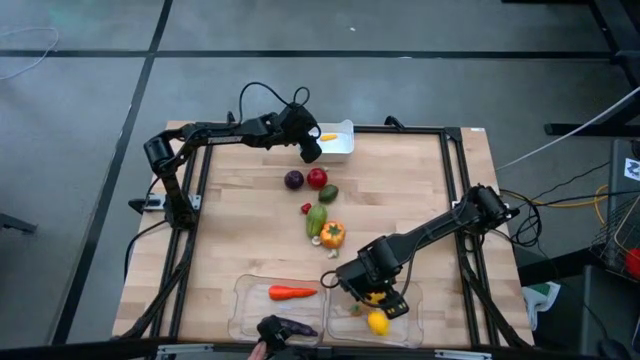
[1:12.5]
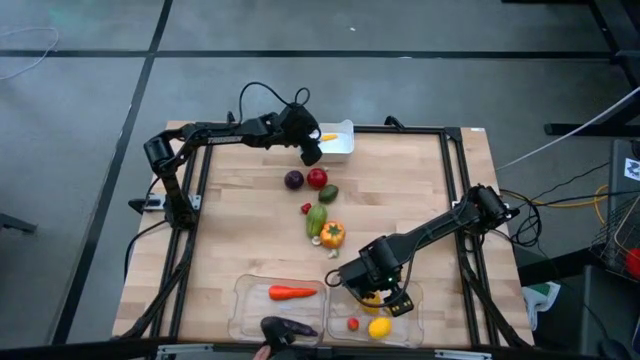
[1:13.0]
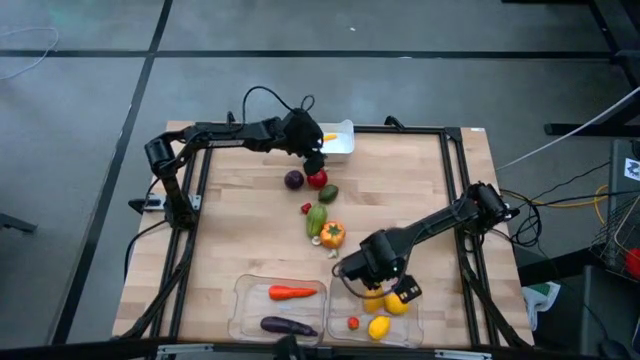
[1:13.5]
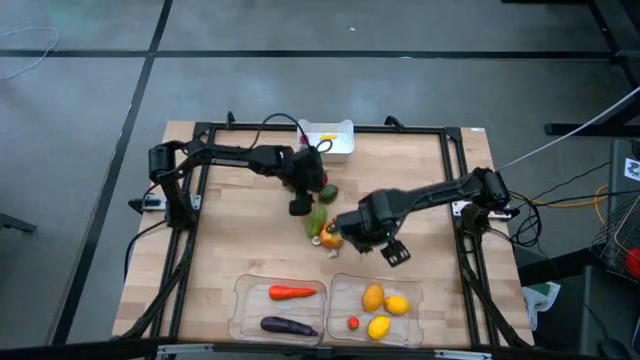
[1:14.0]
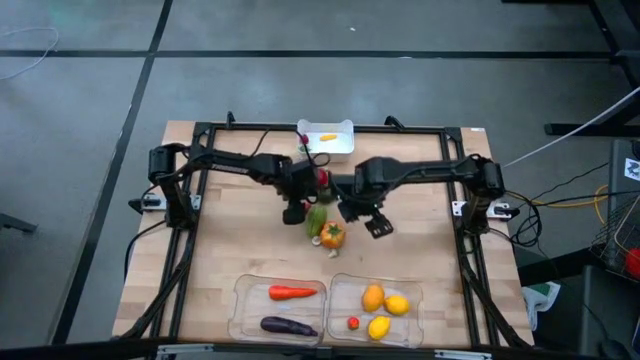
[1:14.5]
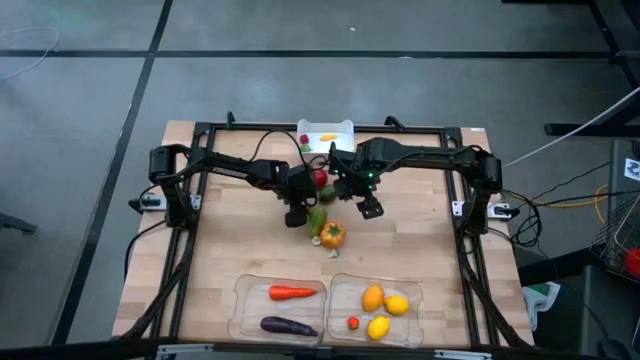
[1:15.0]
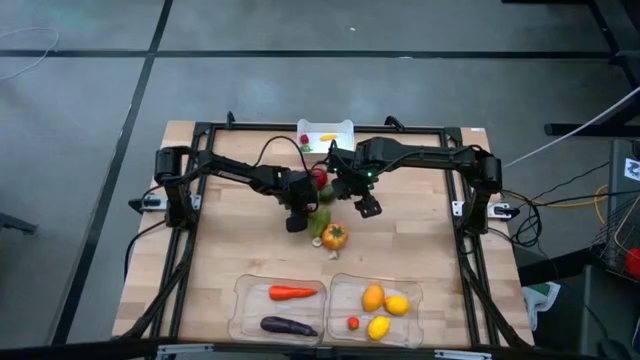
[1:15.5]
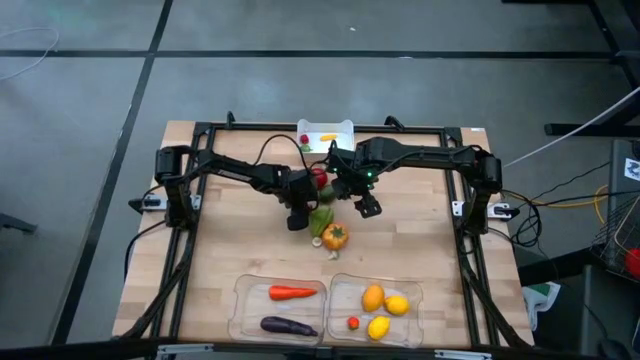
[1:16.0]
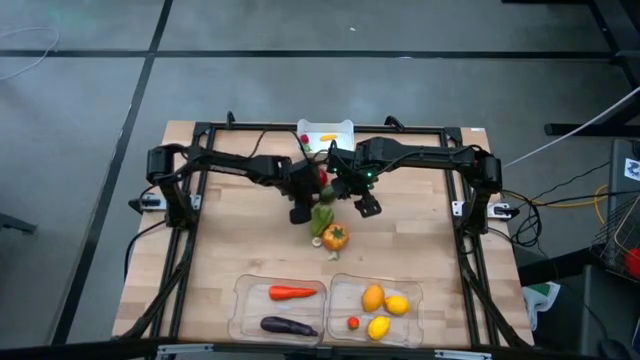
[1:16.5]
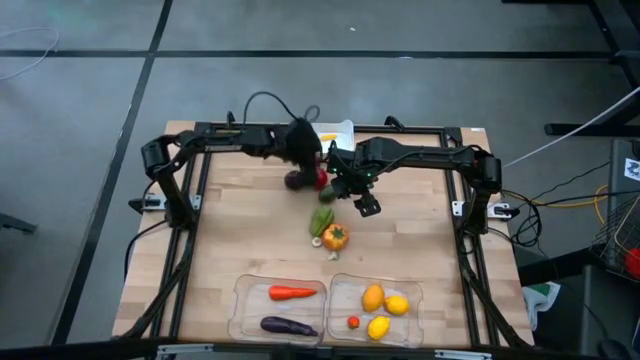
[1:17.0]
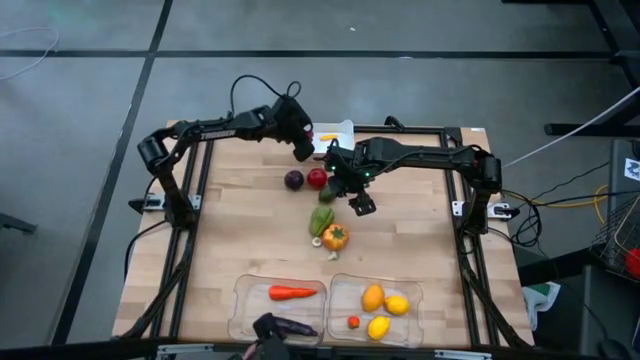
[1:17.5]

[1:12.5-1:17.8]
Task: Sort produce into baskets
Put the red chili pepper into the white bin

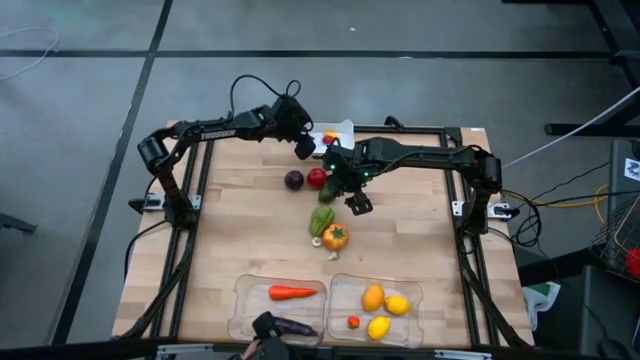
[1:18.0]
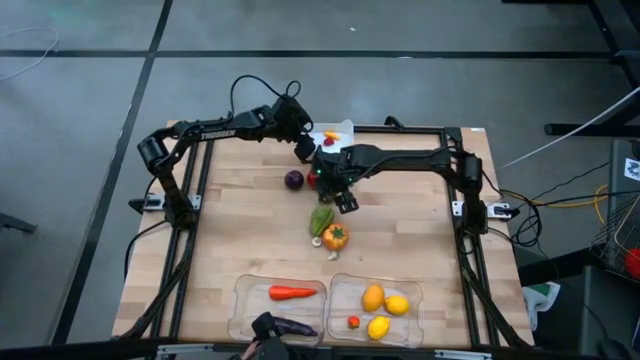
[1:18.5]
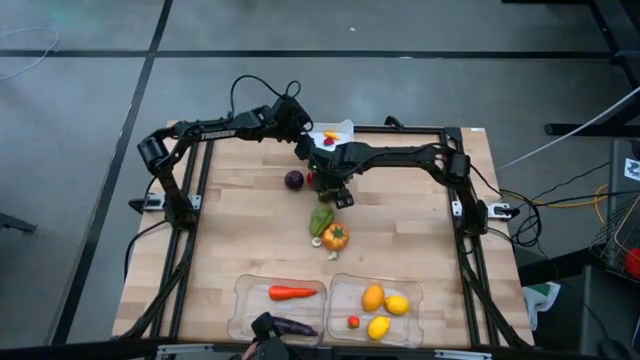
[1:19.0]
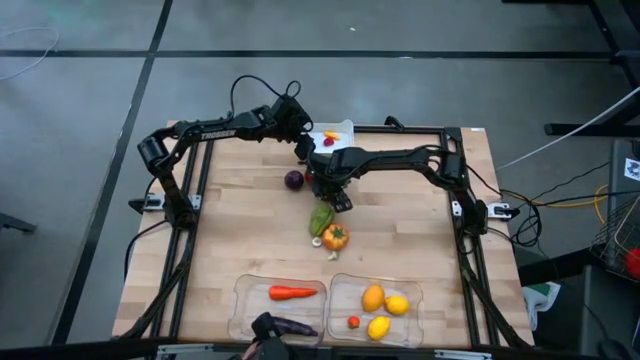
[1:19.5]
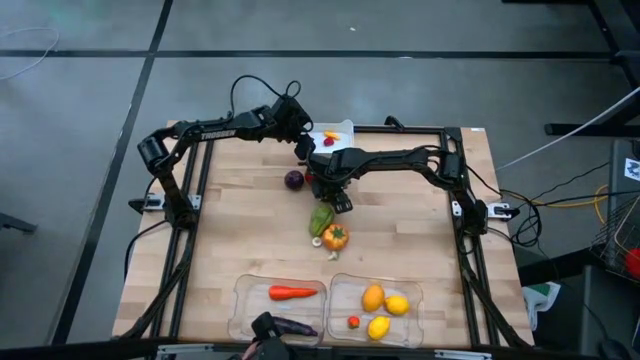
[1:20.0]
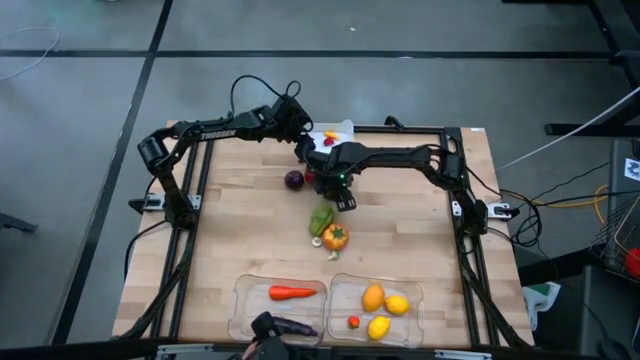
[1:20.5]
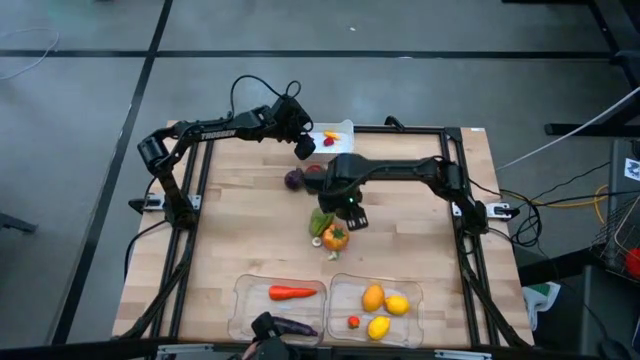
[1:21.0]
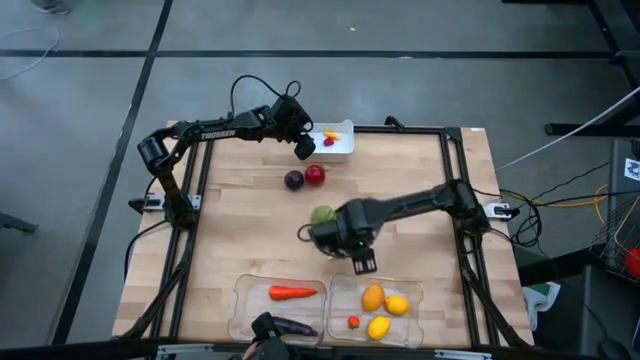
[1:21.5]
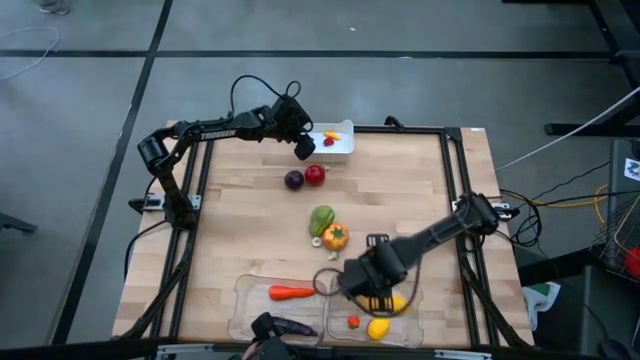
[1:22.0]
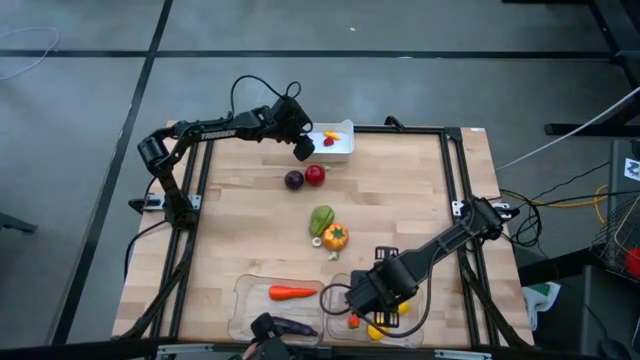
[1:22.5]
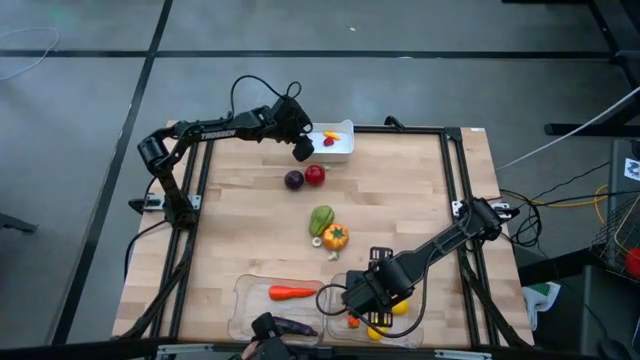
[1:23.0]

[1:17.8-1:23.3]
Put the lime into the right transparent bin

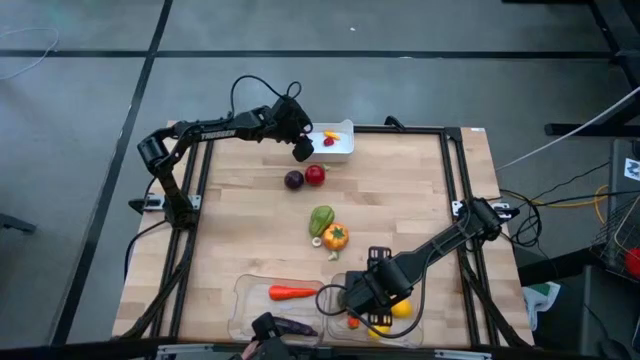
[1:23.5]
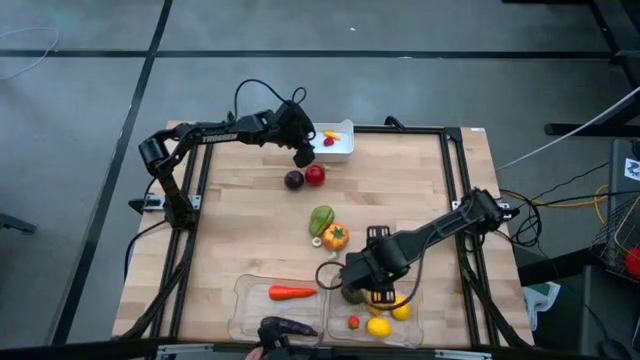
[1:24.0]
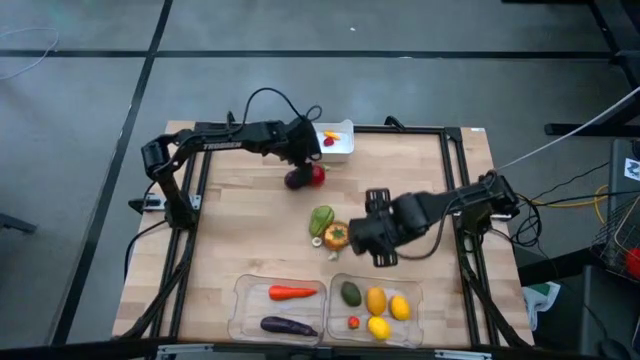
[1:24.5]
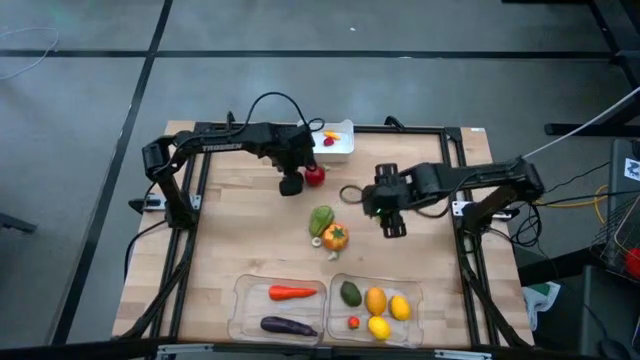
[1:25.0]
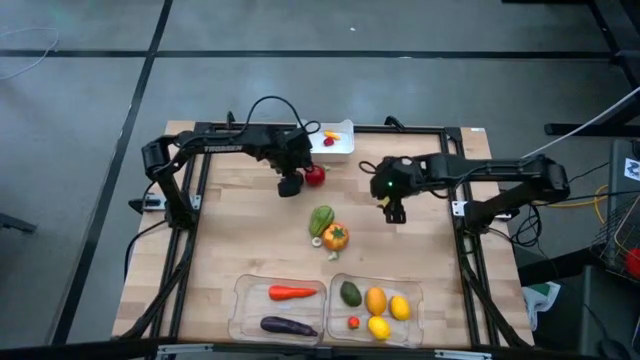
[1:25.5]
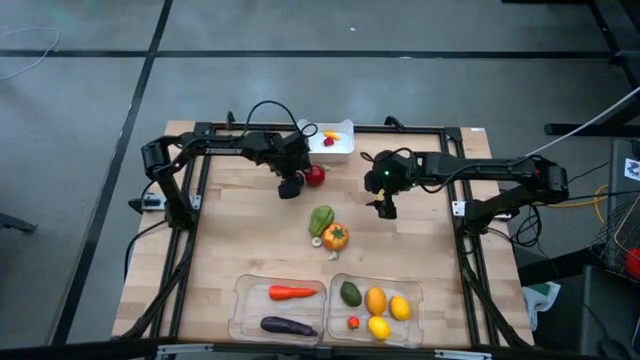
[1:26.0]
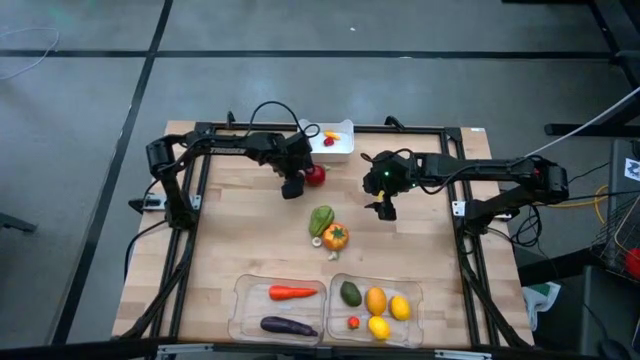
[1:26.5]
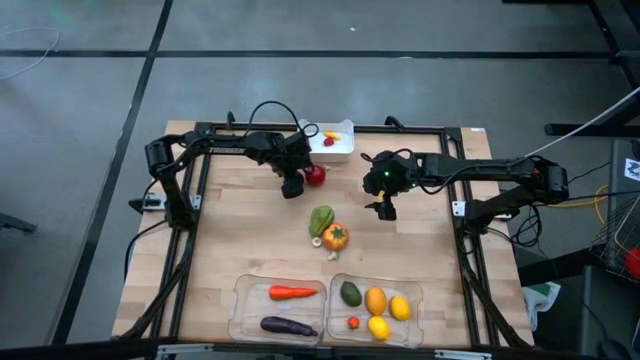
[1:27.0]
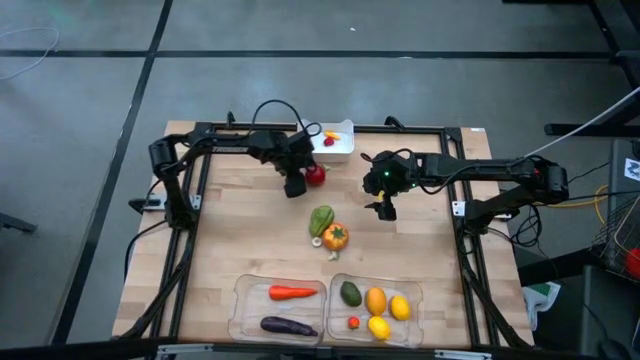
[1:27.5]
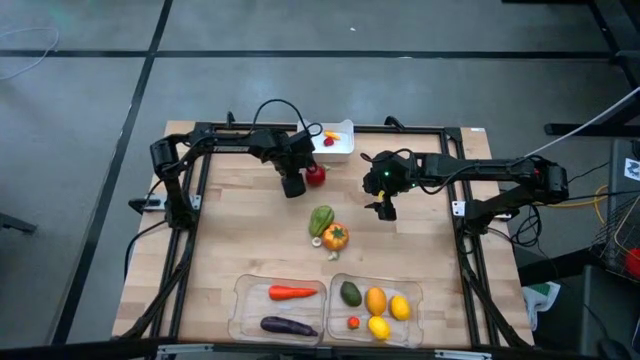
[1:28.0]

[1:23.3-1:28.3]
Put the onion into the left transparent bin

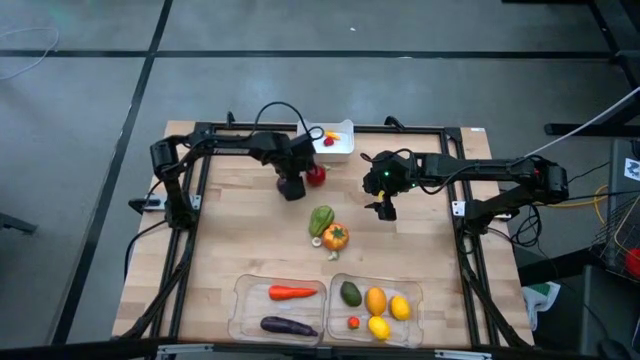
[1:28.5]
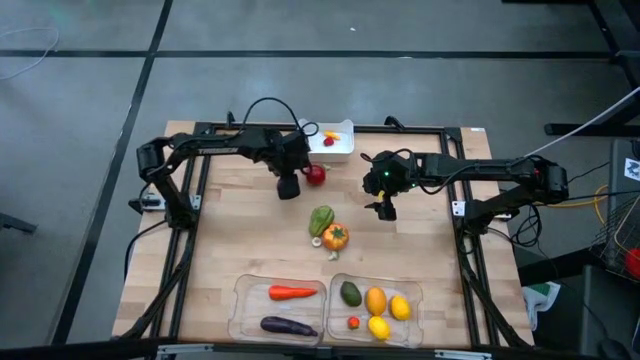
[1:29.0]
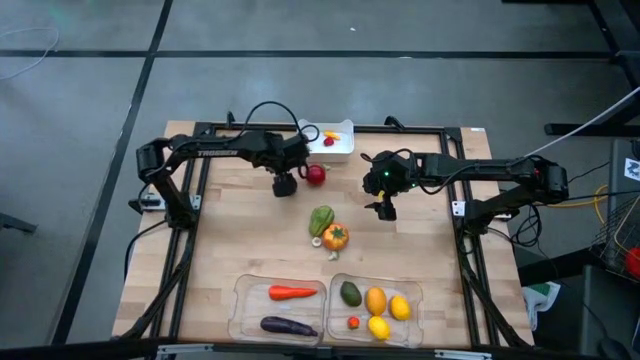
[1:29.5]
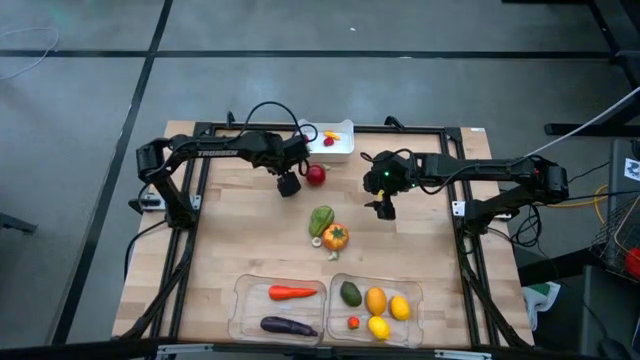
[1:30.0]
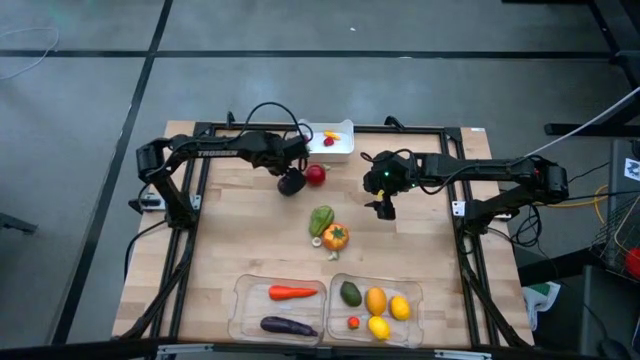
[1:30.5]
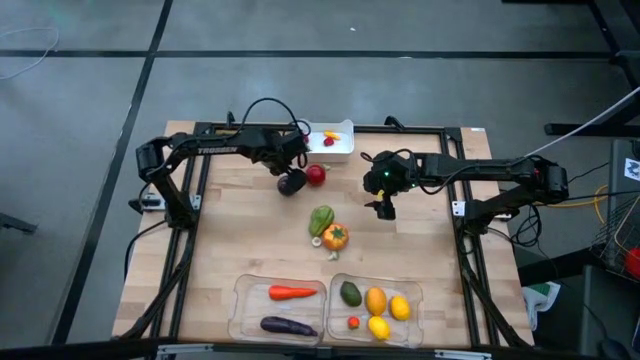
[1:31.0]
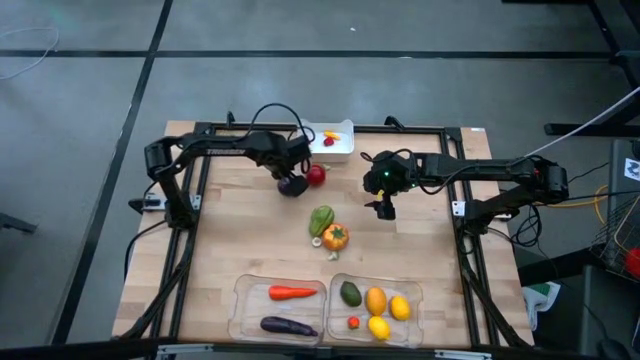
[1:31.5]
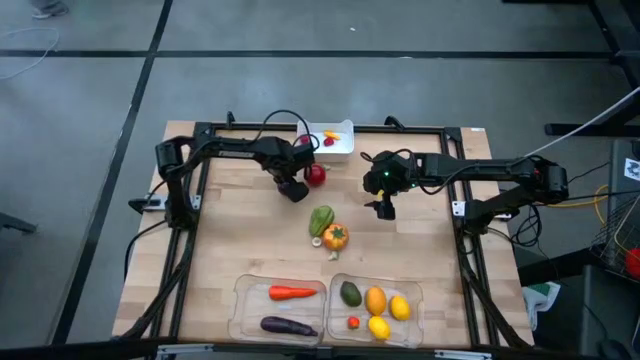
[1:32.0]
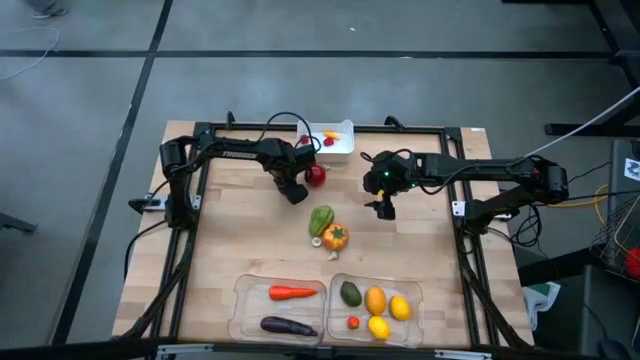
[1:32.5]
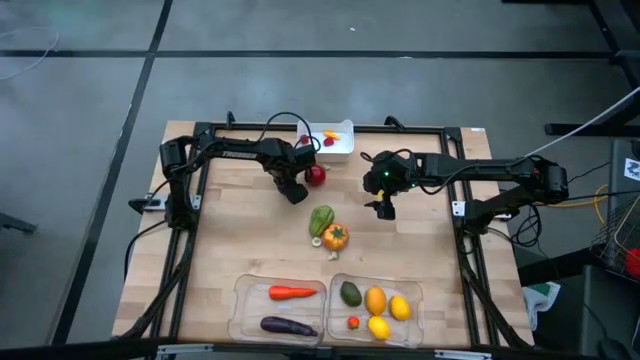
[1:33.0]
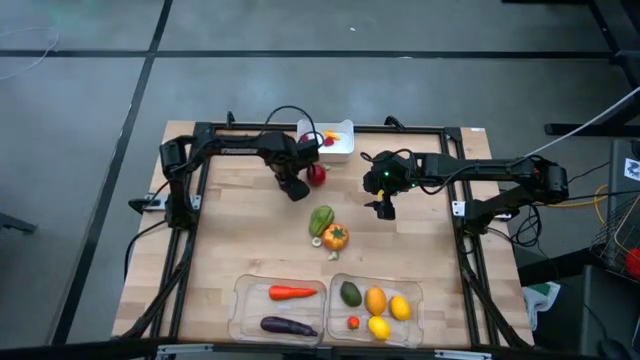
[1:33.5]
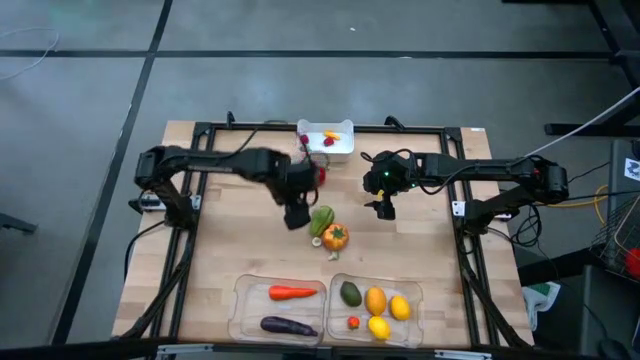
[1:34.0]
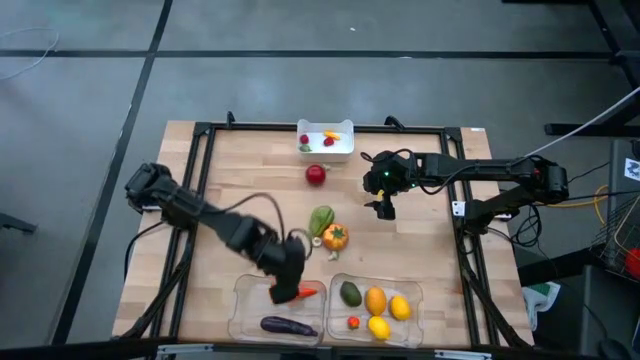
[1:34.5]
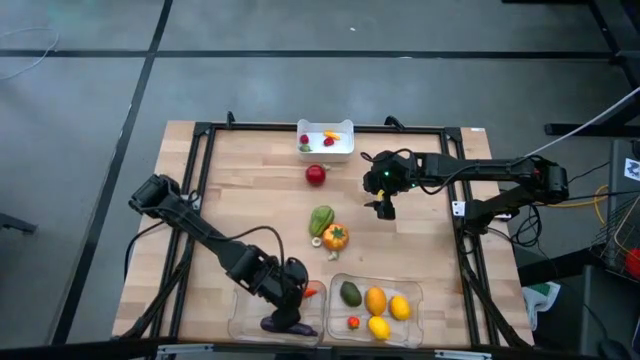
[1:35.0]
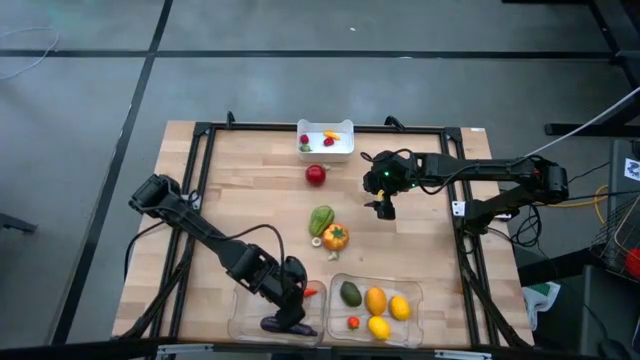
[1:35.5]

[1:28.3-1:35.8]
Put the onion into the left transparent bin
